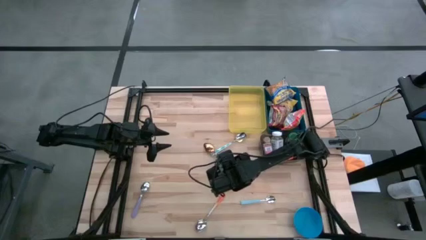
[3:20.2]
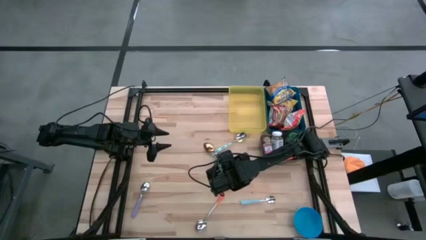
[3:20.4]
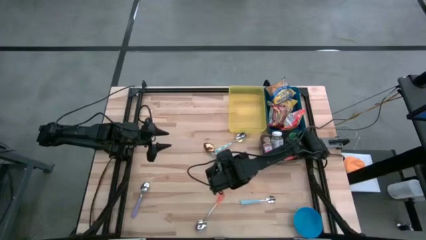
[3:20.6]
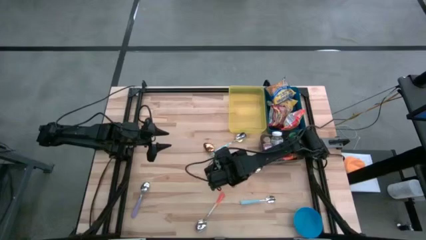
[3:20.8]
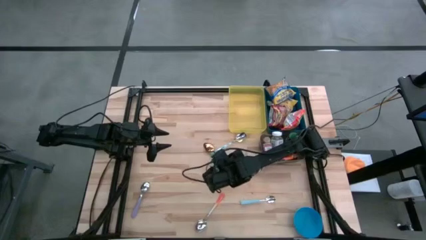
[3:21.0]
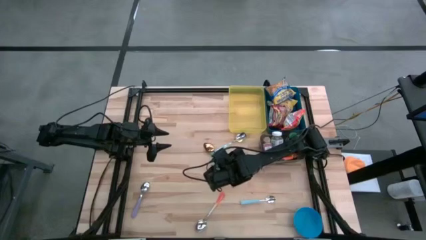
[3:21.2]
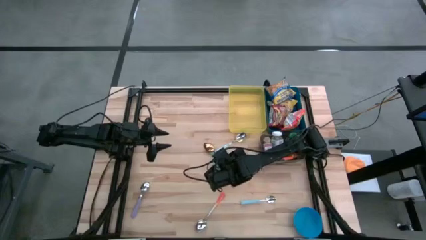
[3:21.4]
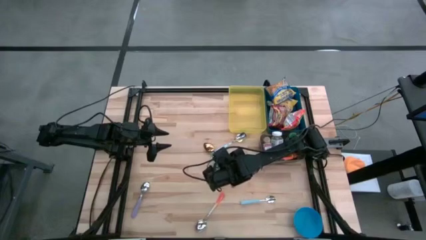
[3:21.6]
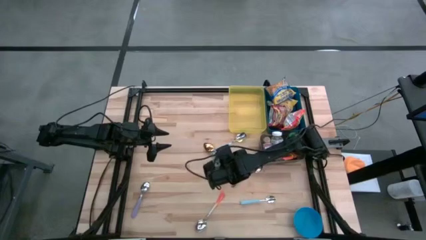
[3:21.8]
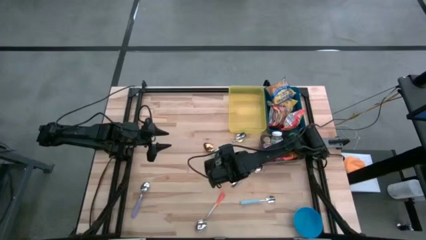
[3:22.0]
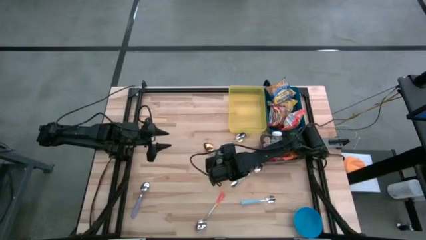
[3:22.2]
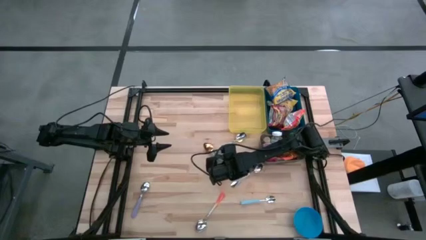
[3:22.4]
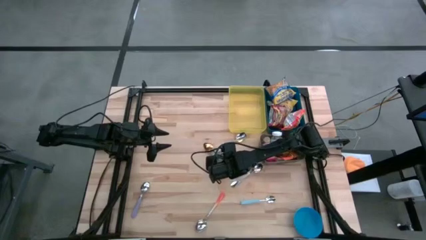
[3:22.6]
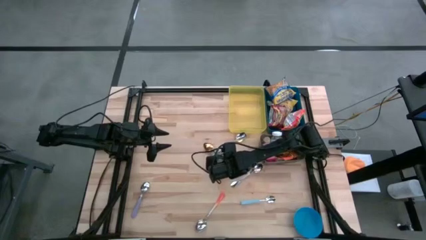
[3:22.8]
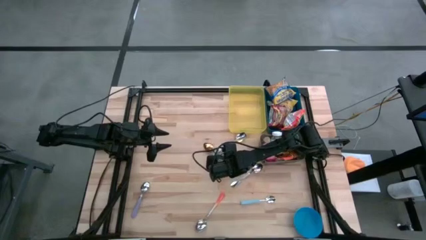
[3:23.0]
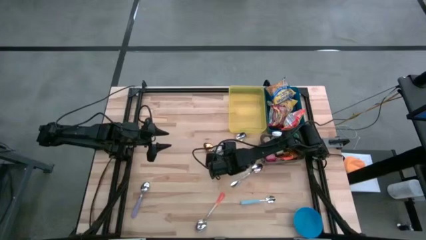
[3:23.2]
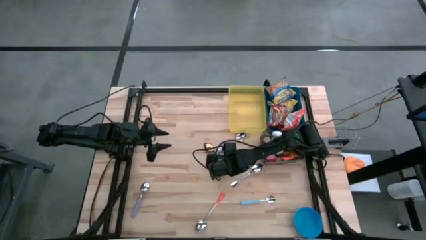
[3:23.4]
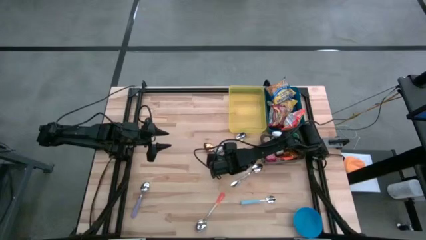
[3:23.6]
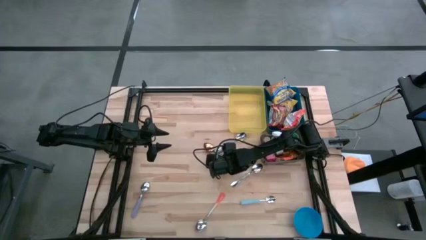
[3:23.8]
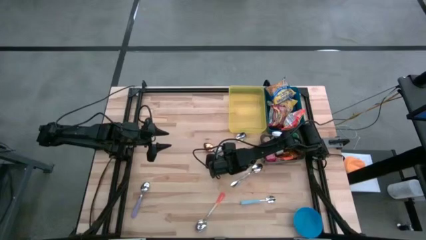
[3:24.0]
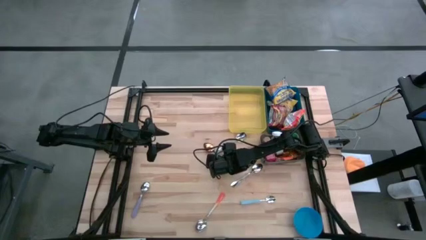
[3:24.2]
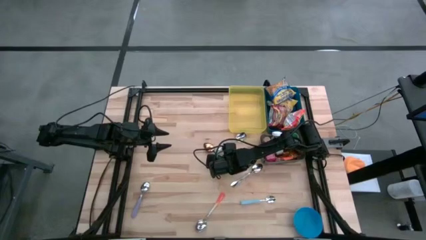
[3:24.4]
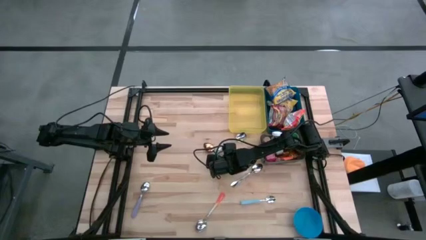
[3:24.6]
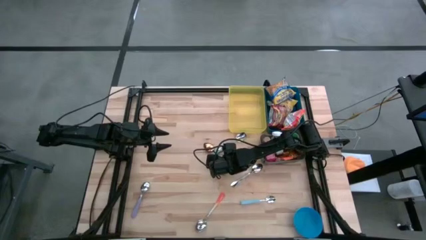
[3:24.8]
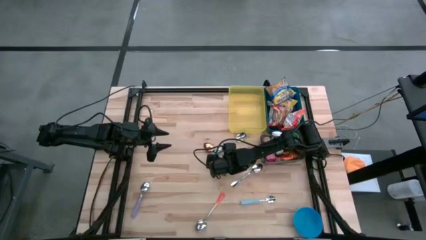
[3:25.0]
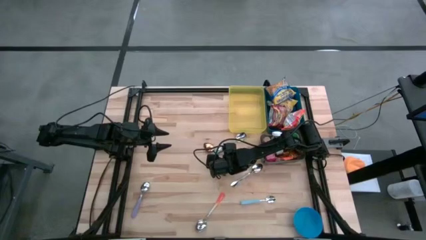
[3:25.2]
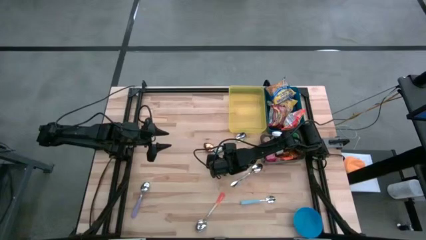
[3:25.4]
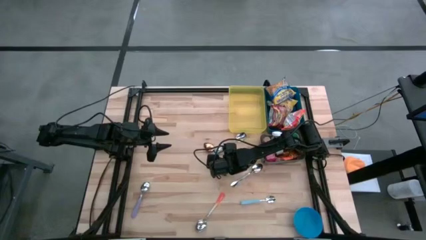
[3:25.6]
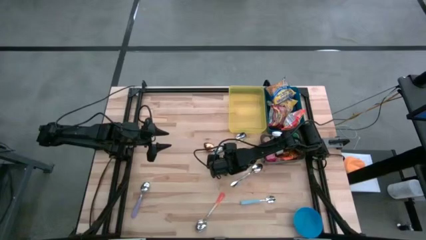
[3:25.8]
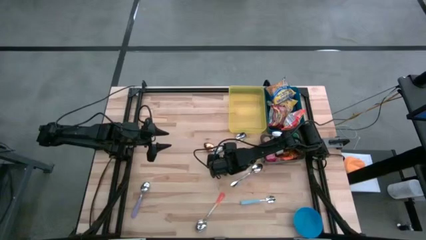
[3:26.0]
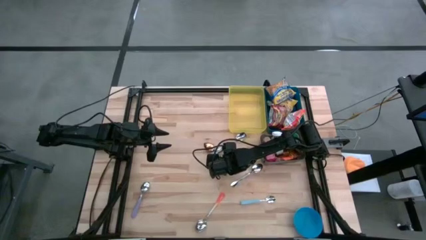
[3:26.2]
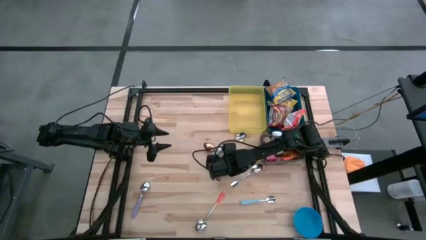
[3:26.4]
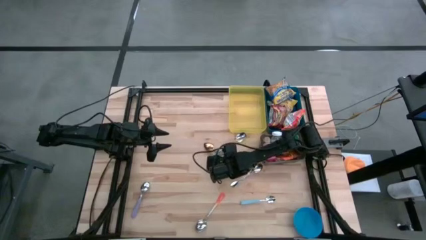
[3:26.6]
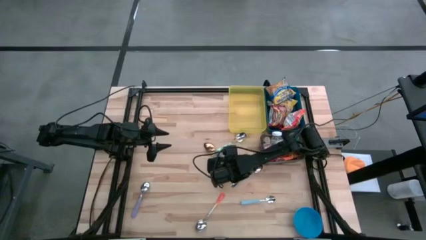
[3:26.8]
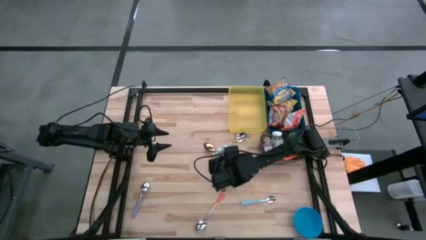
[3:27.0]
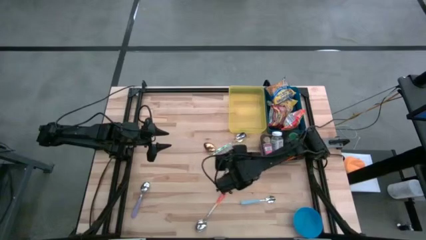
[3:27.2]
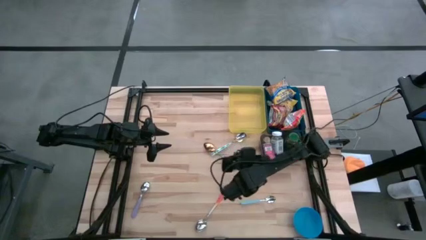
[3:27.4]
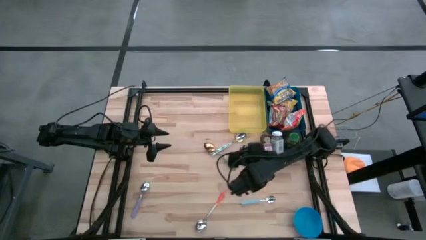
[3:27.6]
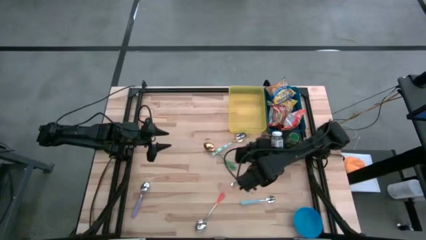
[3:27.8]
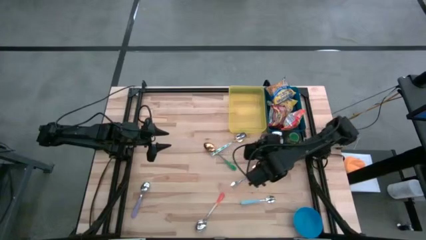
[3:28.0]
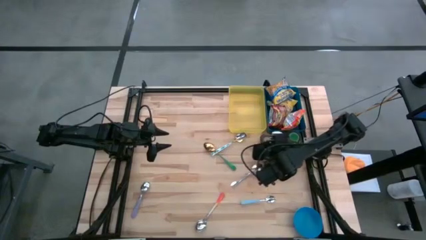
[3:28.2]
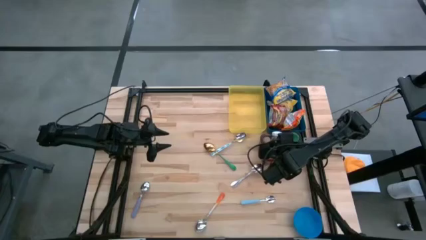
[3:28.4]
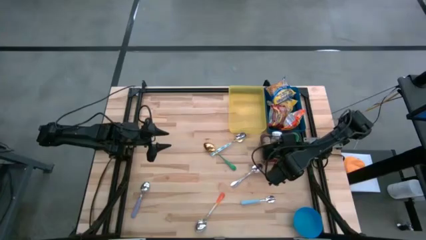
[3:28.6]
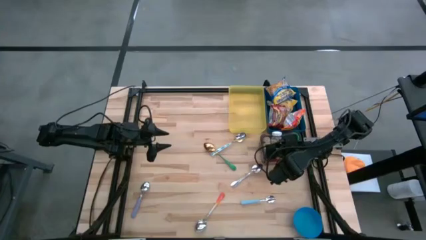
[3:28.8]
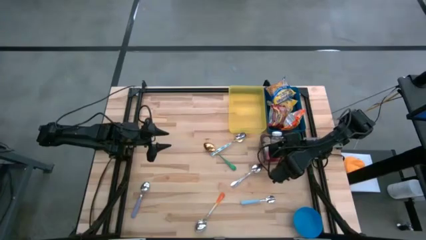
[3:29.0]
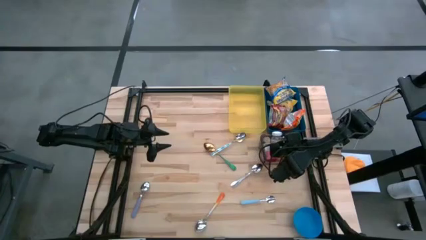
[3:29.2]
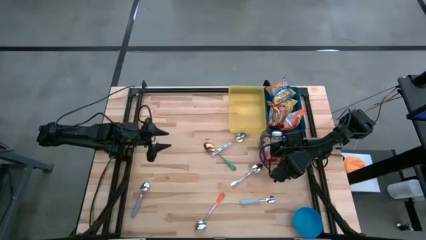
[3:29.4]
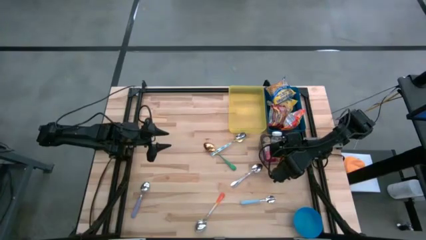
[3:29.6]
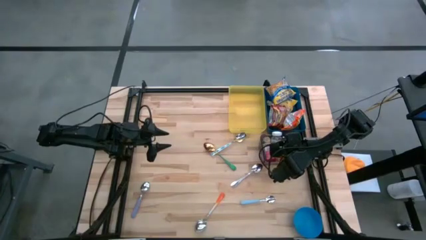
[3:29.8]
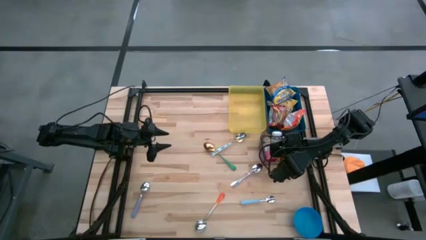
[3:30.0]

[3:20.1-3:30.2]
Put the black seasoning can into the black bin
